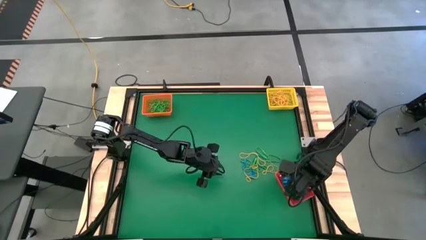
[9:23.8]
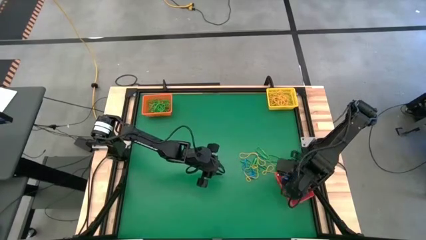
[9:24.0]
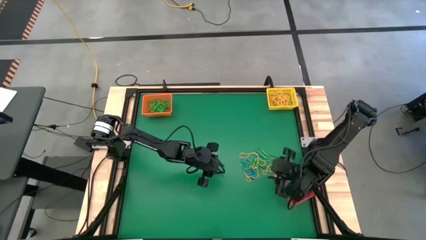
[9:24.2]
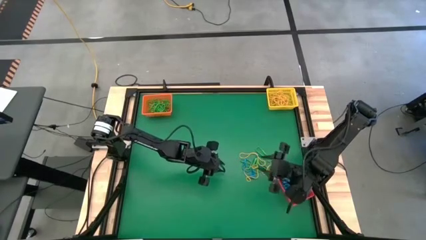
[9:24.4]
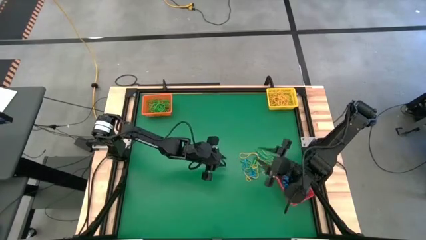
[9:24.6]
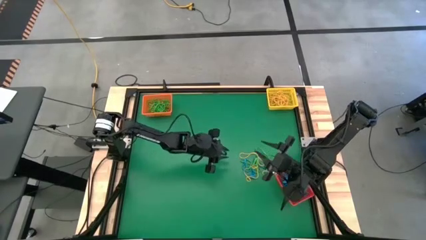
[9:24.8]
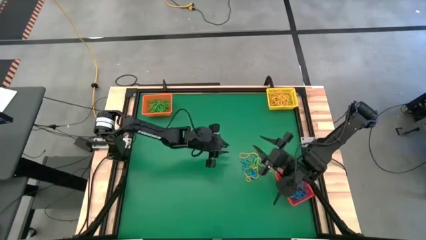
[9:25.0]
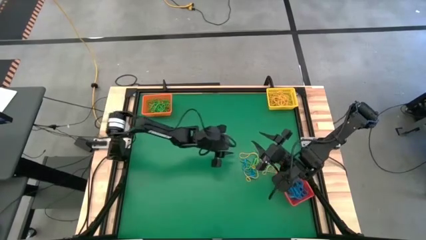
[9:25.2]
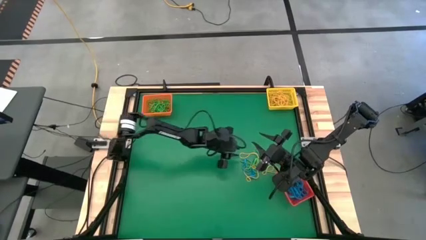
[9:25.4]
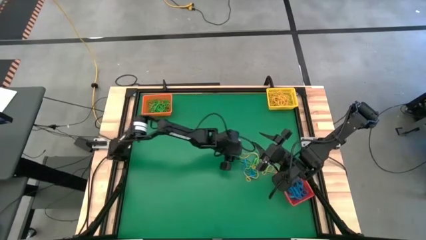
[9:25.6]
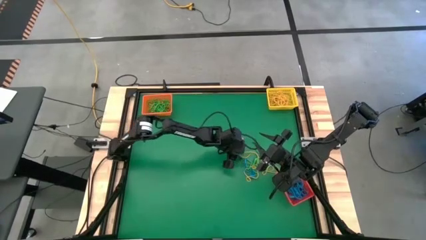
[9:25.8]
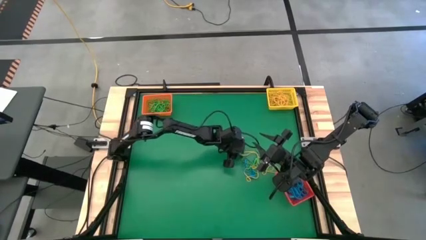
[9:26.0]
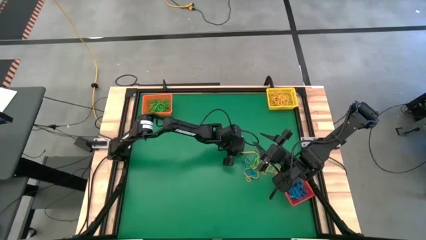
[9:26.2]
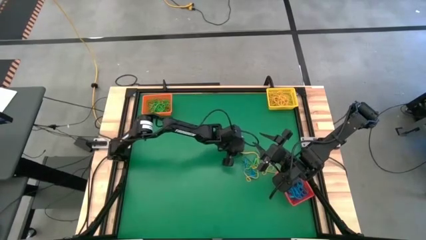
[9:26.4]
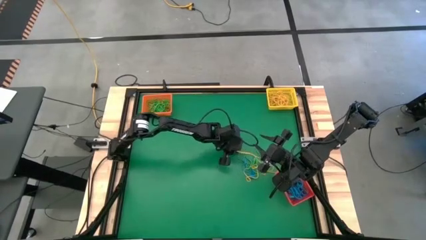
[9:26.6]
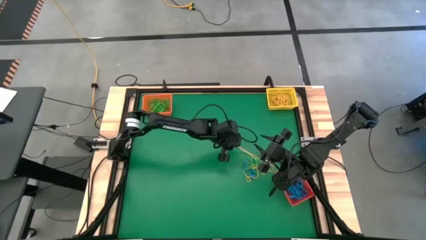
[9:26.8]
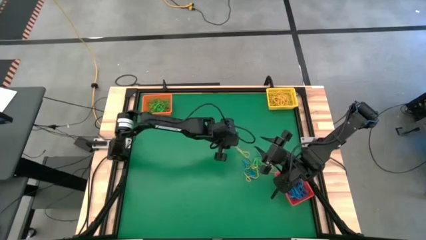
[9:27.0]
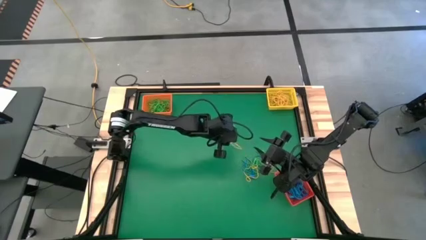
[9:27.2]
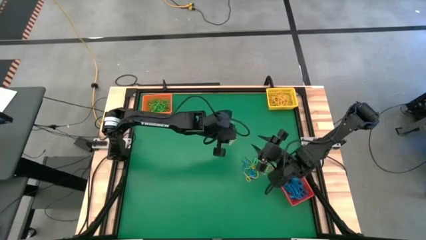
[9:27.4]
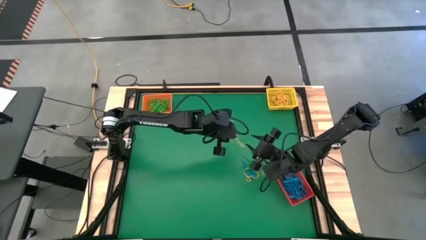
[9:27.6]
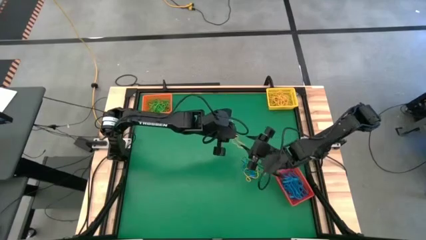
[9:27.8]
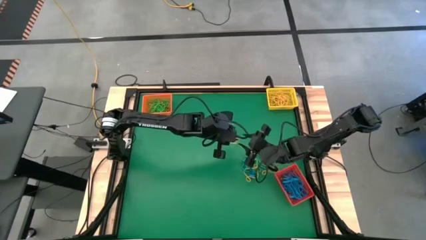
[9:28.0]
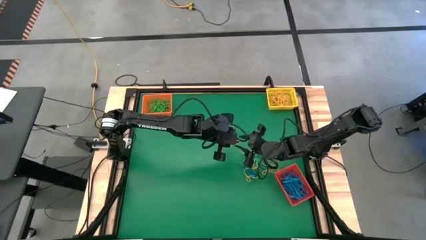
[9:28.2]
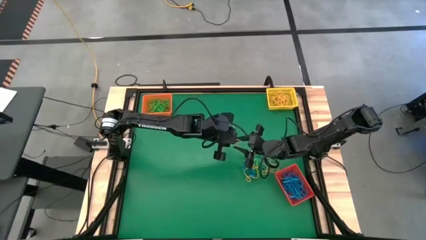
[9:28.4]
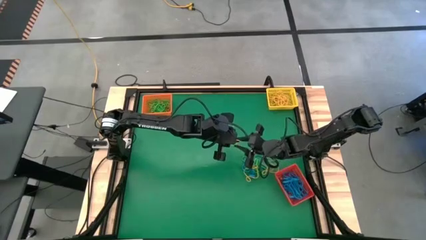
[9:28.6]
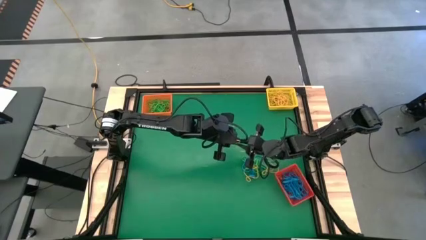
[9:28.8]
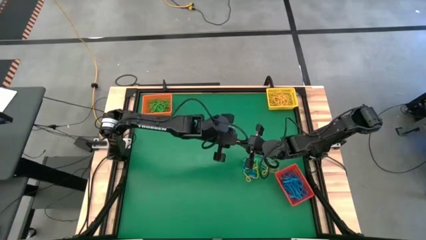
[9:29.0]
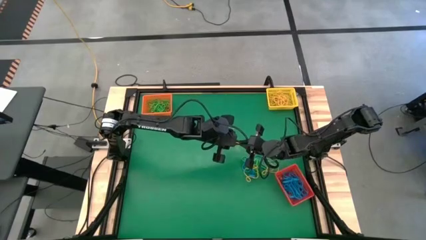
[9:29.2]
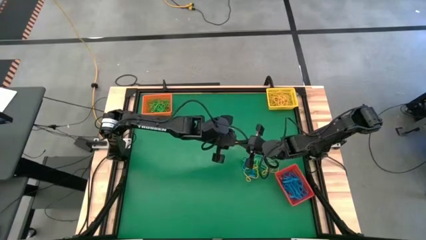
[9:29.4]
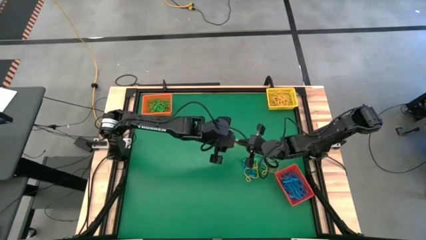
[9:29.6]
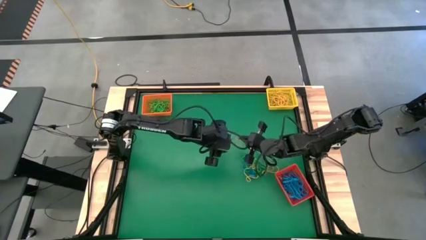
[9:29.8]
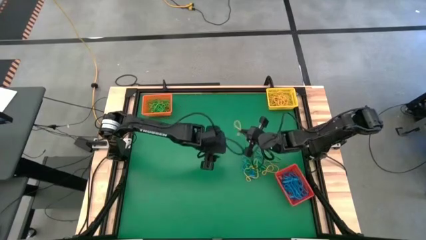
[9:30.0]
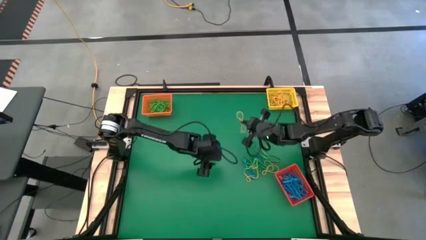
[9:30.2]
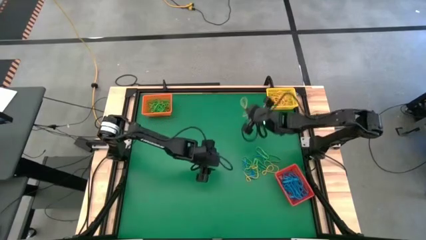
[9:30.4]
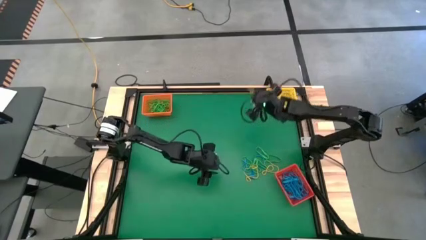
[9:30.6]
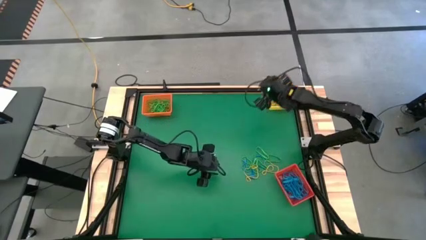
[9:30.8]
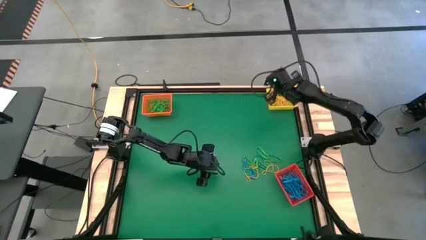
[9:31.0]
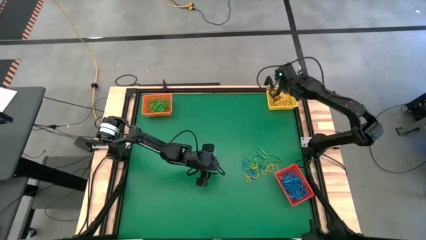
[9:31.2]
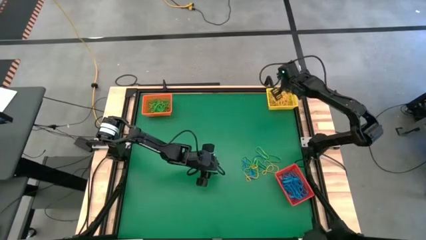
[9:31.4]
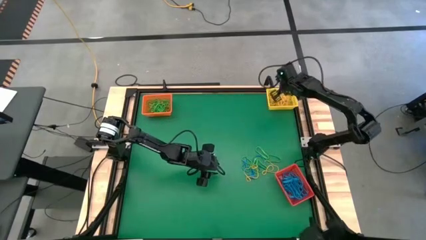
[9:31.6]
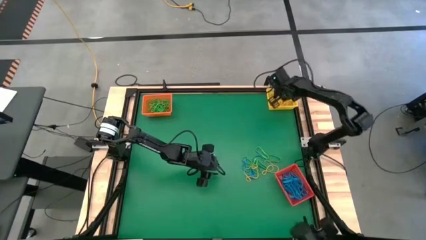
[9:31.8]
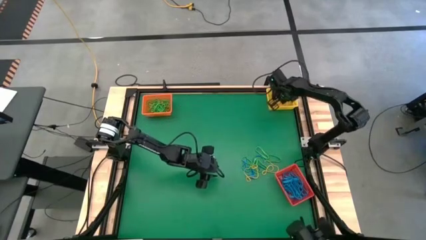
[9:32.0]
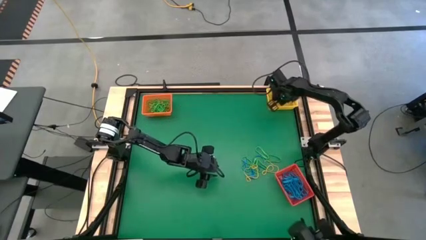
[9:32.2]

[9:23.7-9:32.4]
Task: Sort rubber bands into baskets
Put the yellow rubber band into the yellow bin

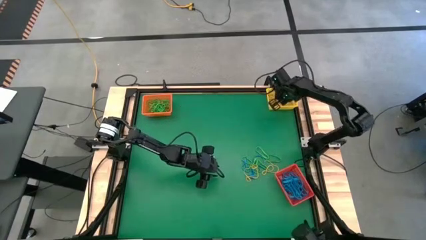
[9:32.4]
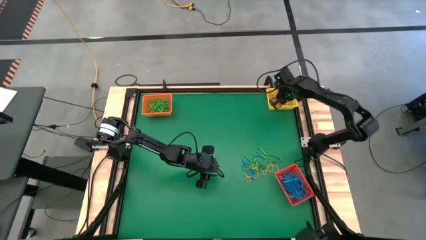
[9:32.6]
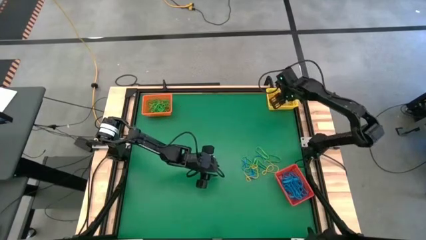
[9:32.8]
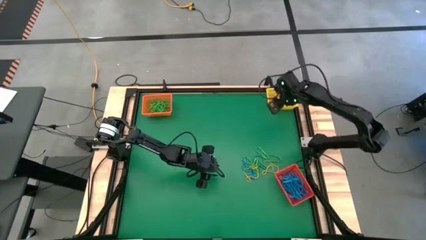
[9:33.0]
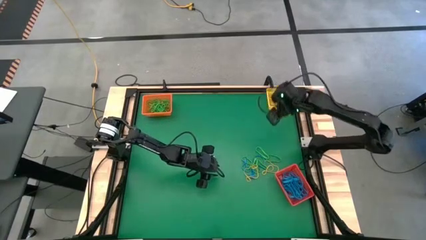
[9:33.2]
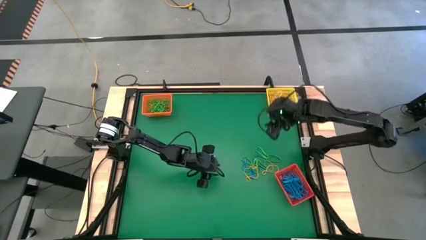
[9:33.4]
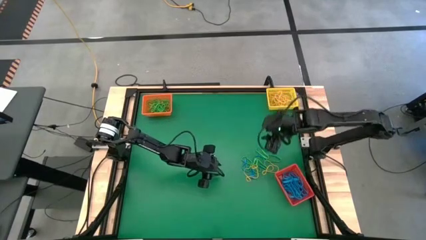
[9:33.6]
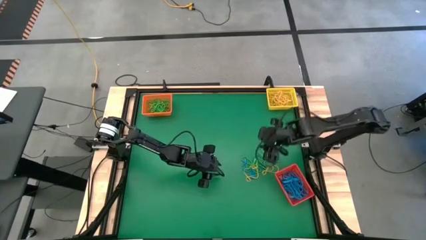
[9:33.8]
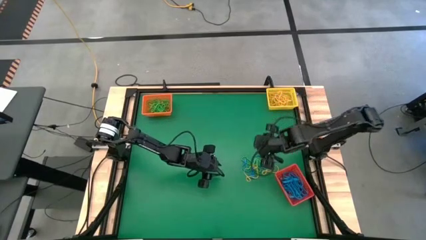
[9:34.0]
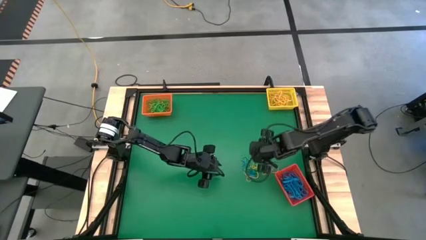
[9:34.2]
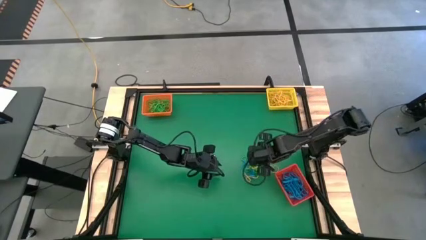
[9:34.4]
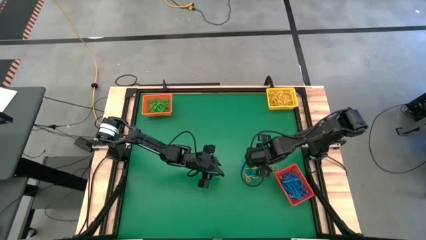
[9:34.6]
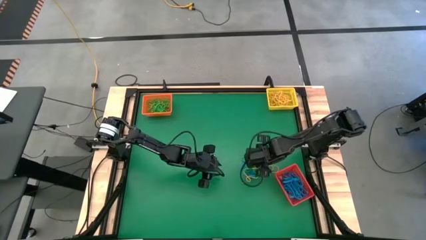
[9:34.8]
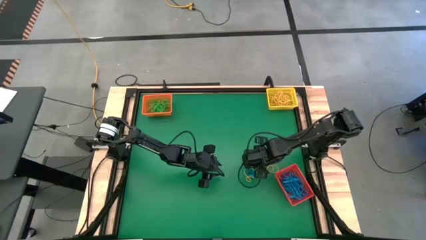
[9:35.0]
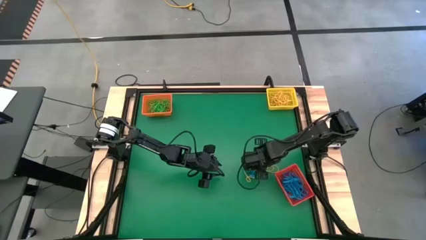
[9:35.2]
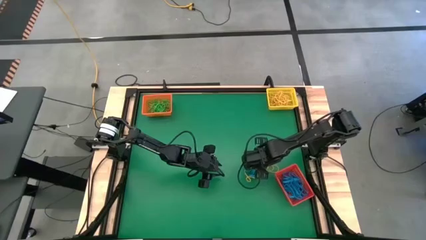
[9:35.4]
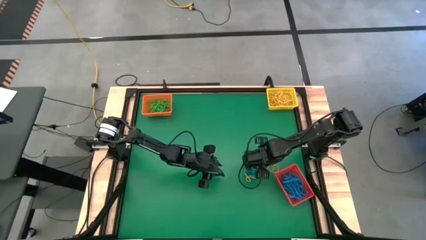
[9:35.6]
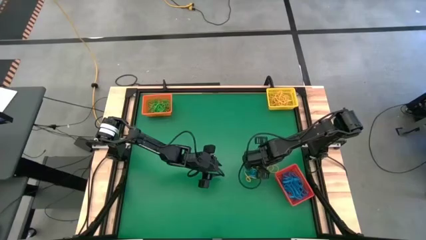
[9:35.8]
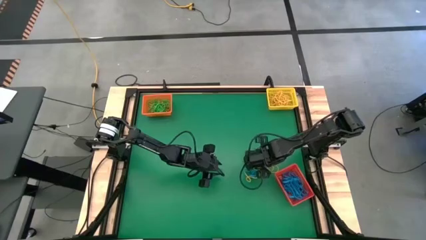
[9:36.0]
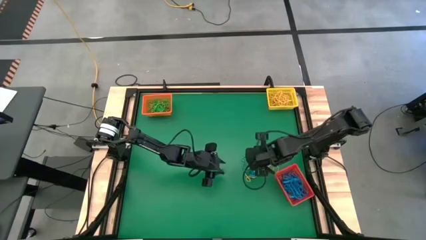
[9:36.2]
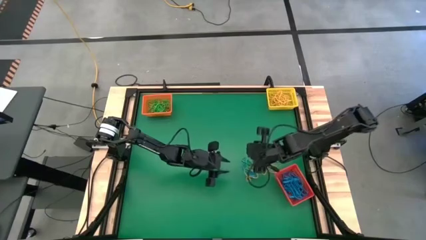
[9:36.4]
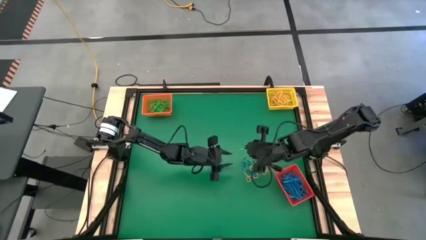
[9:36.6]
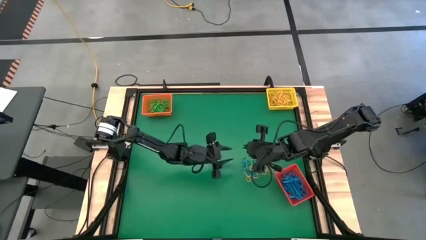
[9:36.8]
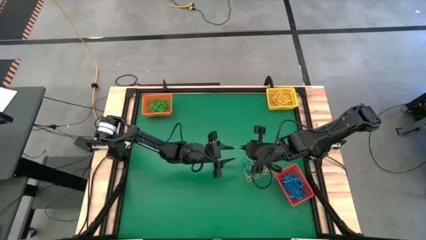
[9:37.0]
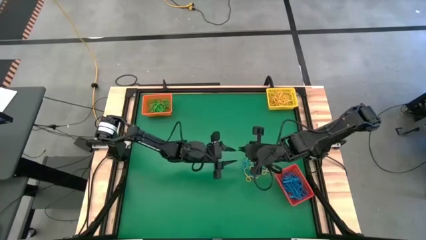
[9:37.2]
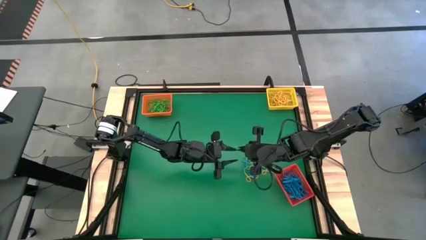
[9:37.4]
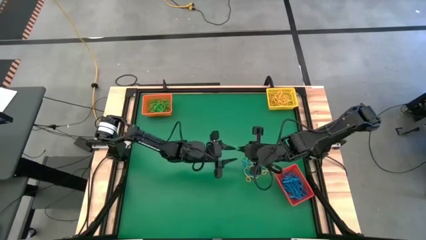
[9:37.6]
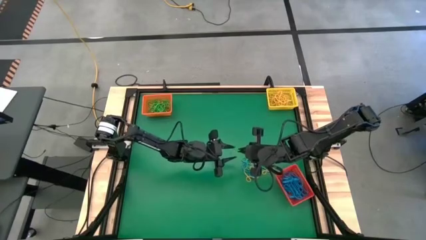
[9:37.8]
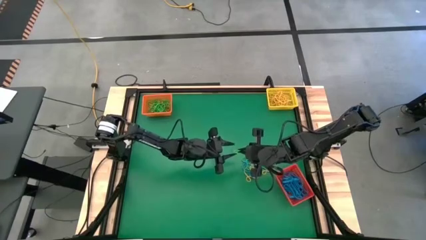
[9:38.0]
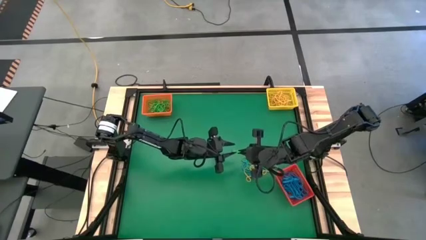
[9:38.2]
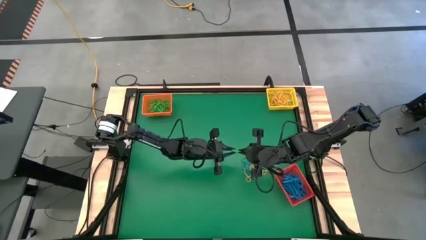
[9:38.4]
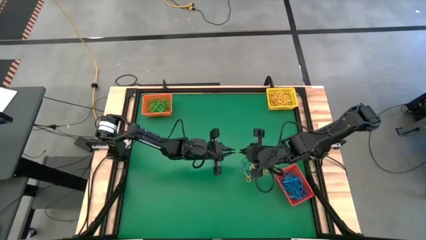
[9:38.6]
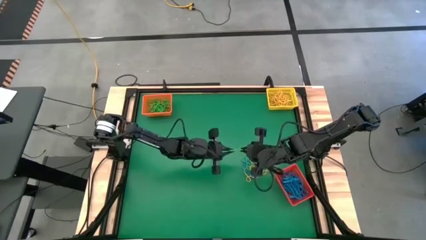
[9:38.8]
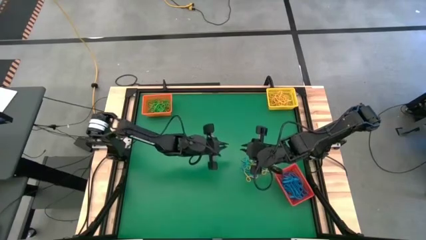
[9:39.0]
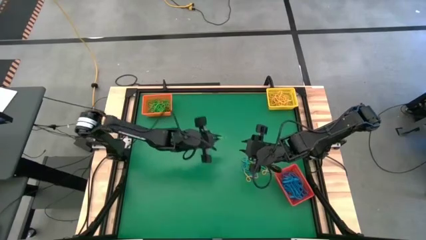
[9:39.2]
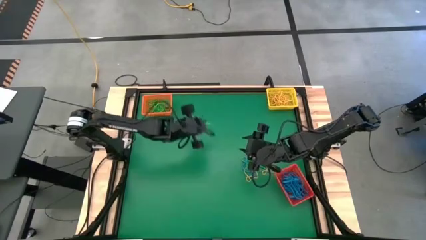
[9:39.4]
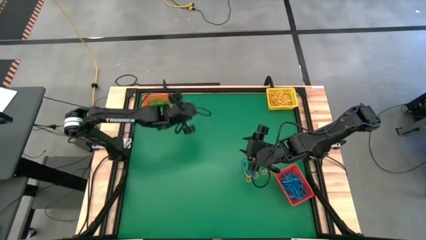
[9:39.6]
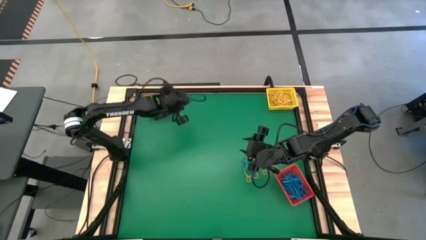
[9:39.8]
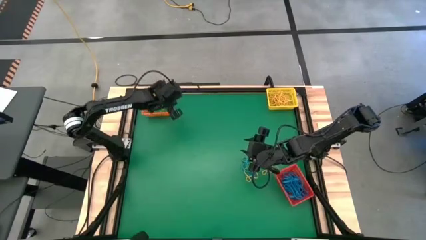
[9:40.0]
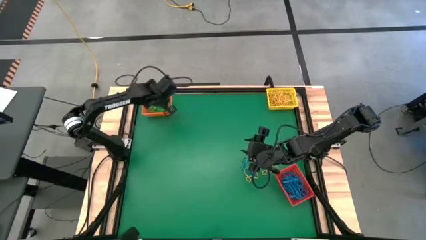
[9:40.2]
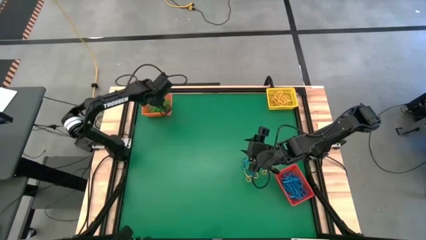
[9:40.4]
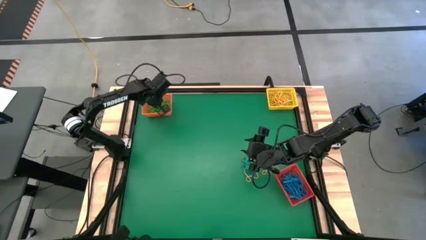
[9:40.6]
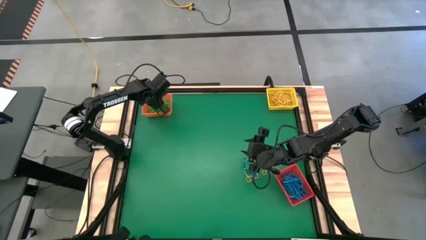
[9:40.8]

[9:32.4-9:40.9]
Put the green rubber band into the orange bin
